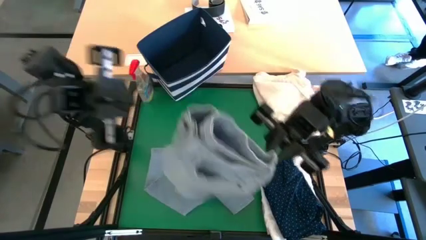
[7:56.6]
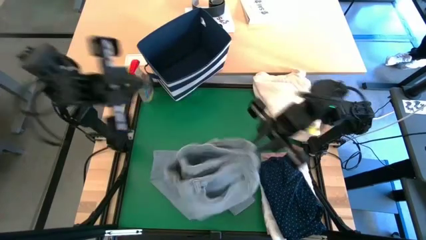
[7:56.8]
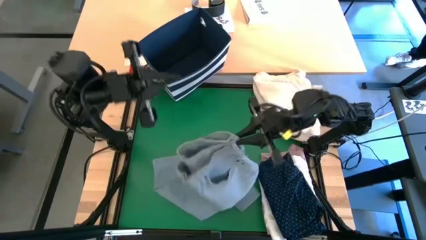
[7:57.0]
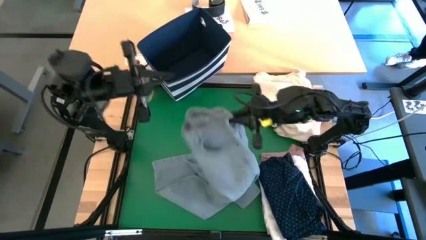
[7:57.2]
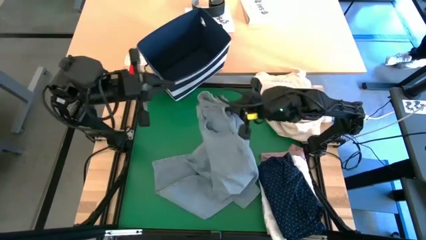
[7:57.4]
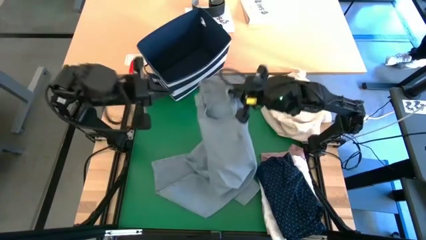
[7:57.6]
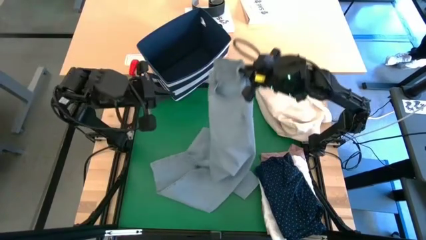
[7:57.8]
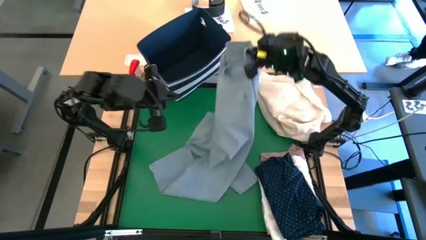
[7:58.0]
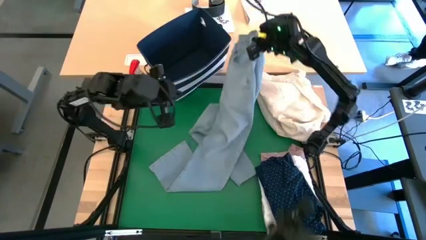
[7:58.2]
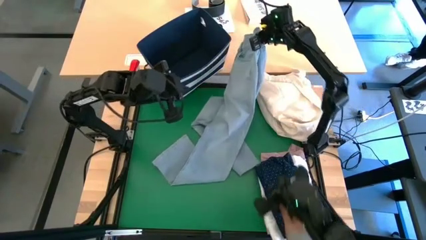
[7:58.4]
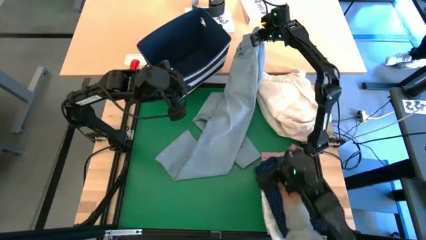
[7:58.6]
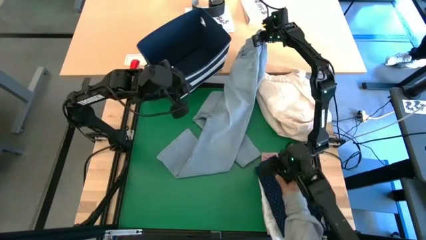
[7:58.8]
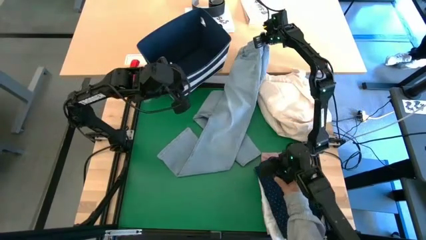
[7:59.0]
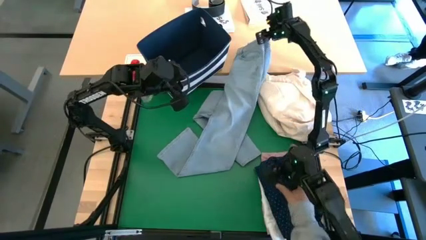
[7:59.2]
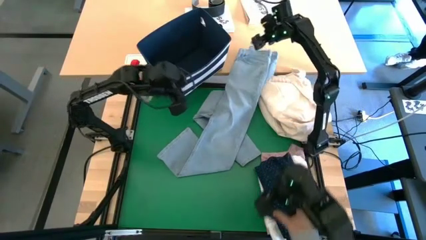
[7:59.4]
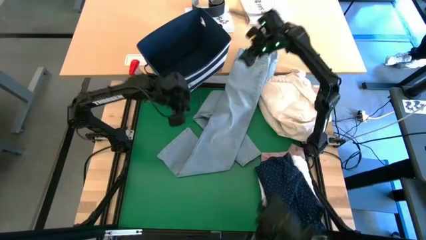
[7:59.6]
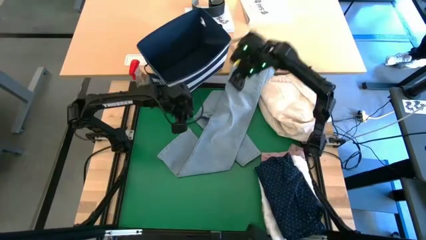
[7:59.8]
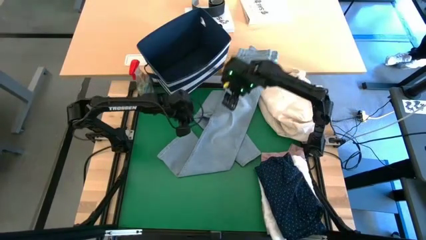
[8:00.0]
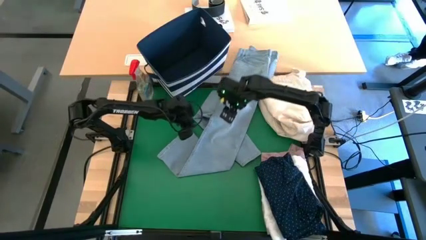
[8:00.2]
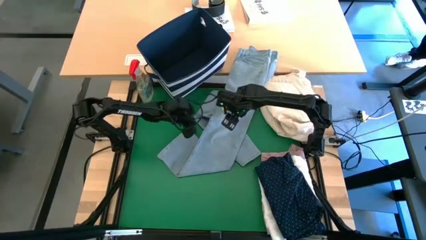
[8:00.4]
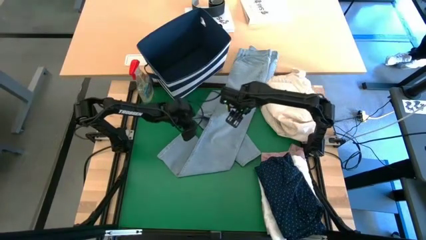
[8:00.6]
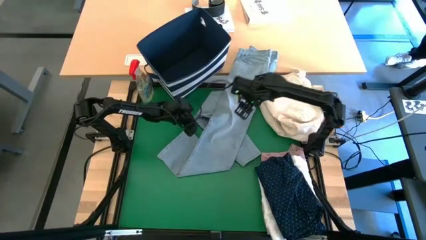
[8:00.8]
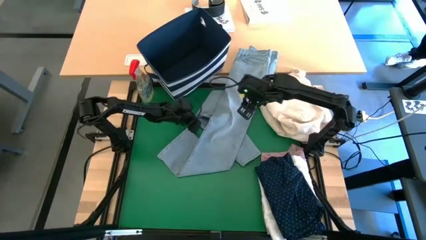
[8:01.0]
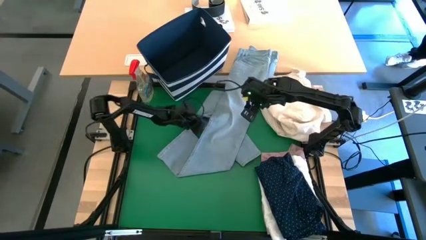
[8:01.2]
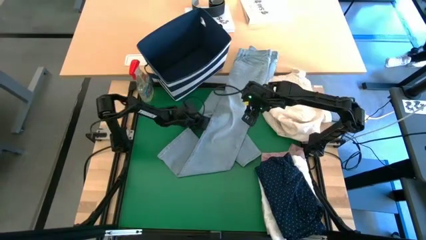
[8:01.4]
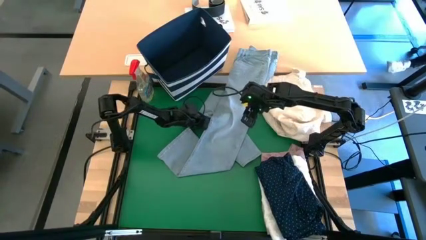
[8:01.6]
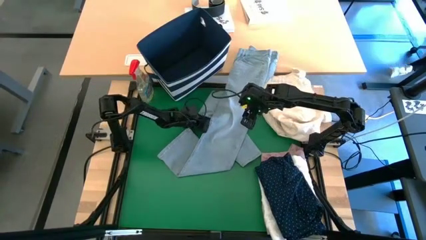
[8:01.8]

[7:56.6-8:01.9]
Task: Fold laundry
Fold the blue jeans

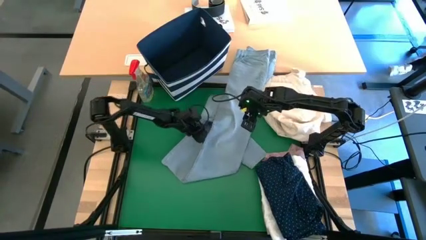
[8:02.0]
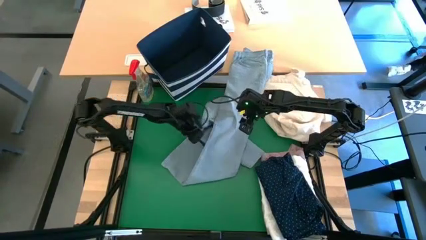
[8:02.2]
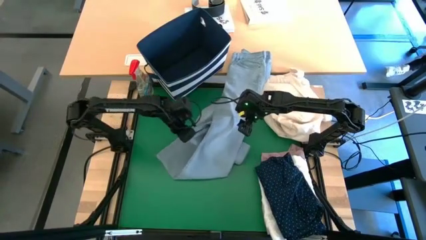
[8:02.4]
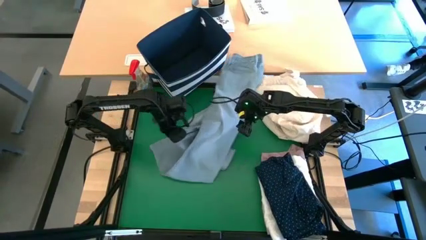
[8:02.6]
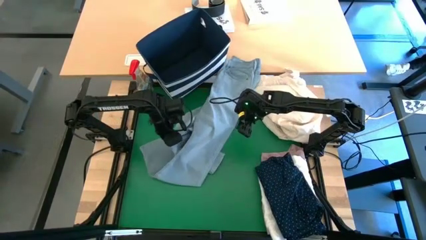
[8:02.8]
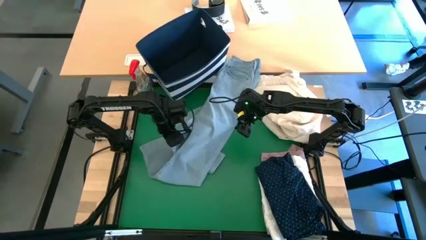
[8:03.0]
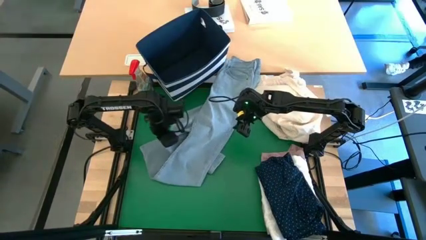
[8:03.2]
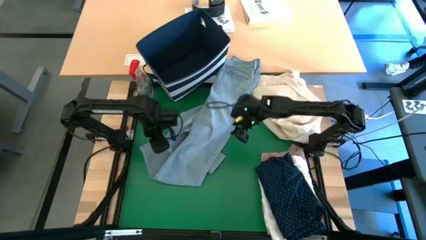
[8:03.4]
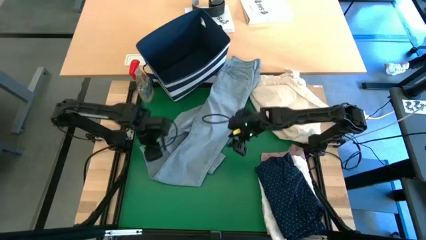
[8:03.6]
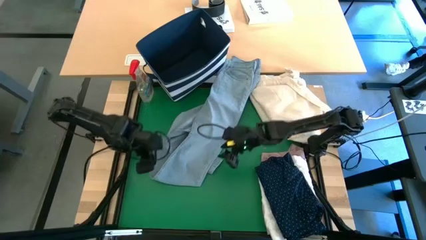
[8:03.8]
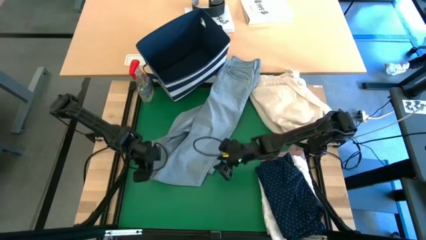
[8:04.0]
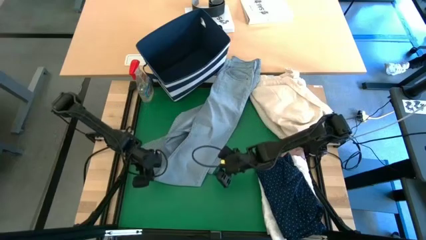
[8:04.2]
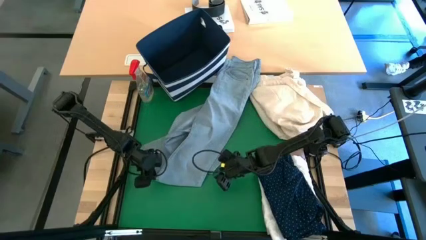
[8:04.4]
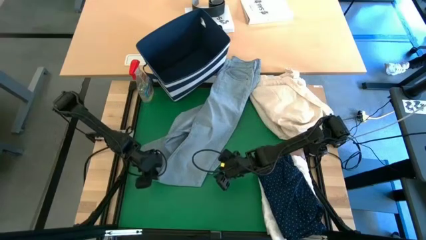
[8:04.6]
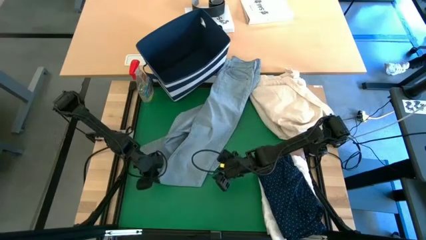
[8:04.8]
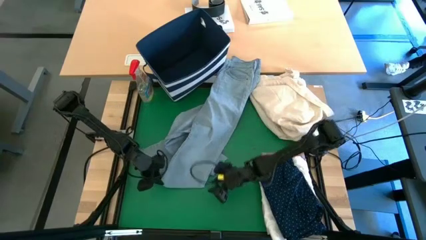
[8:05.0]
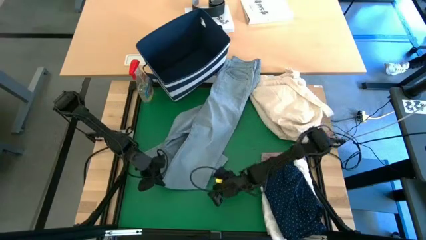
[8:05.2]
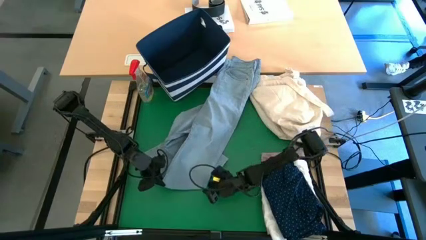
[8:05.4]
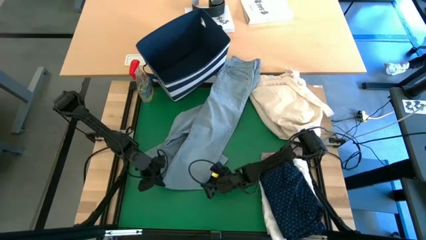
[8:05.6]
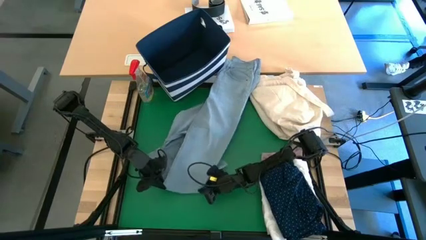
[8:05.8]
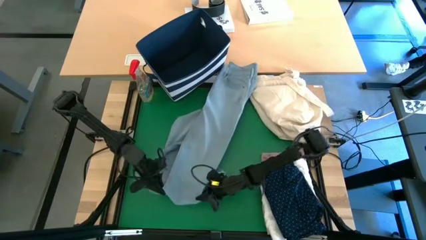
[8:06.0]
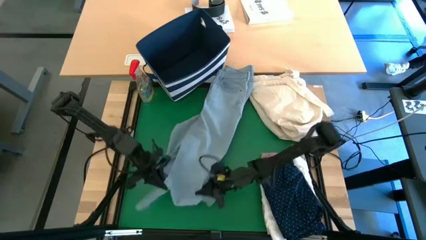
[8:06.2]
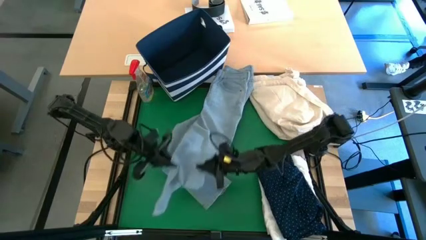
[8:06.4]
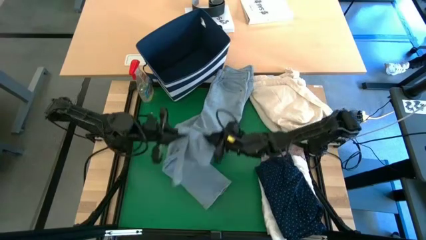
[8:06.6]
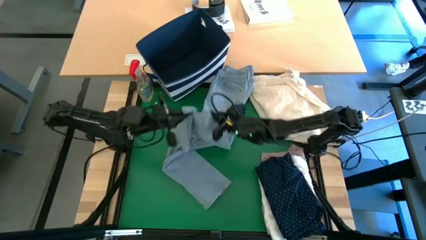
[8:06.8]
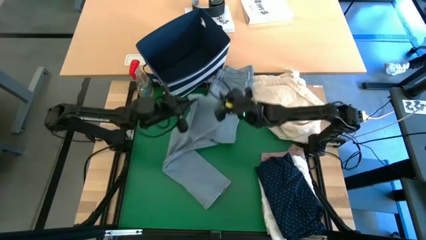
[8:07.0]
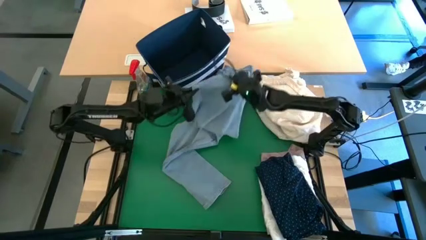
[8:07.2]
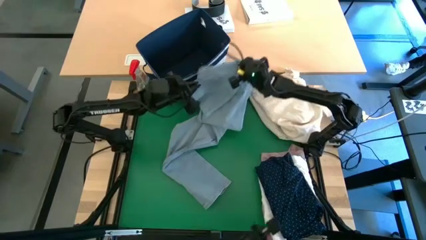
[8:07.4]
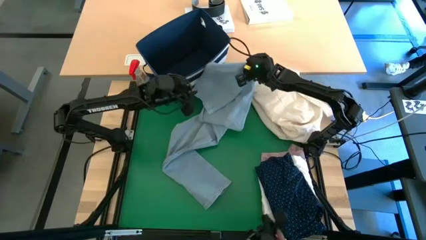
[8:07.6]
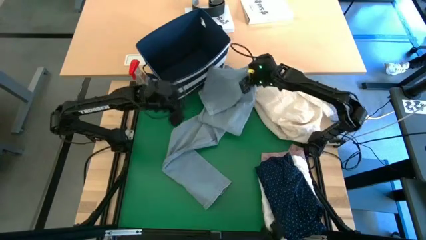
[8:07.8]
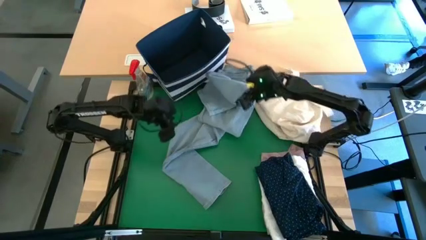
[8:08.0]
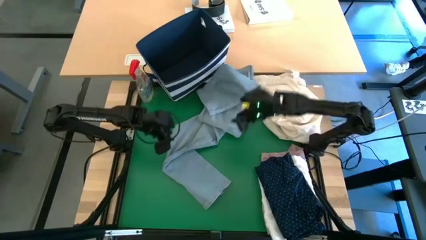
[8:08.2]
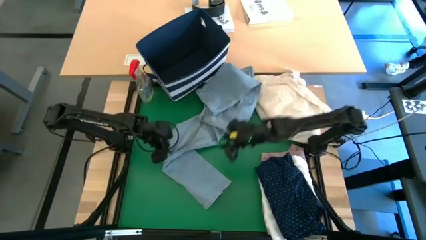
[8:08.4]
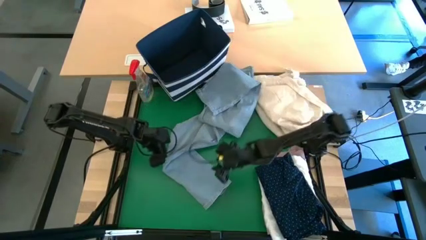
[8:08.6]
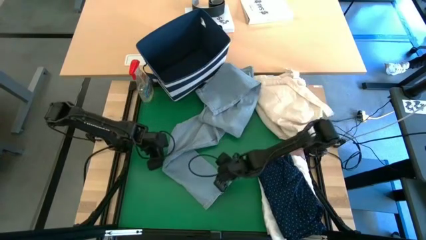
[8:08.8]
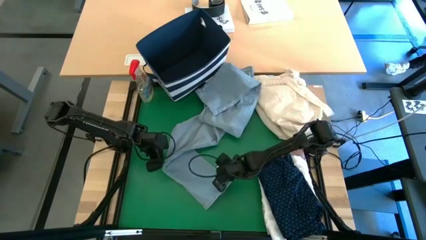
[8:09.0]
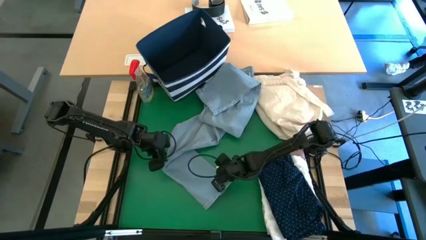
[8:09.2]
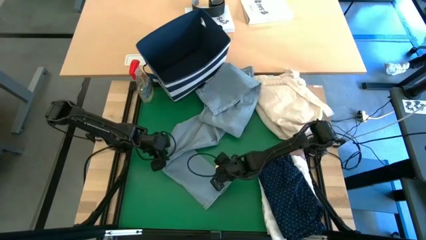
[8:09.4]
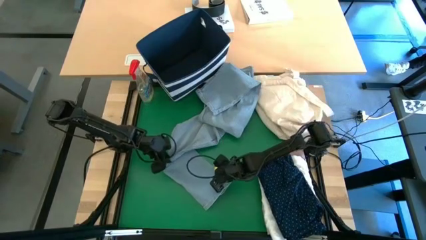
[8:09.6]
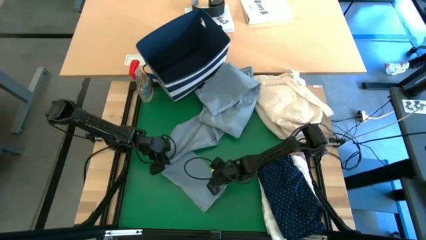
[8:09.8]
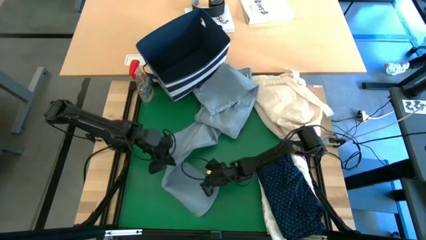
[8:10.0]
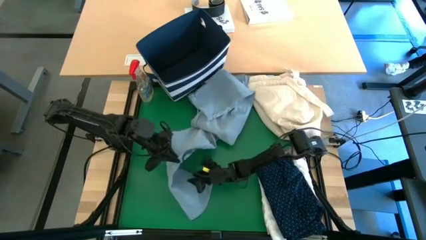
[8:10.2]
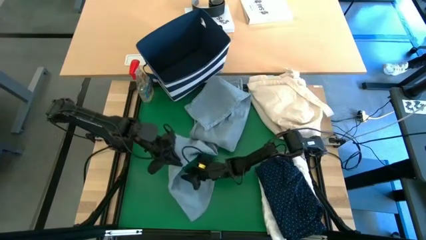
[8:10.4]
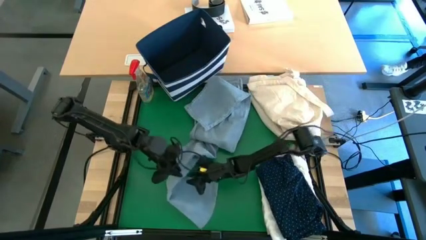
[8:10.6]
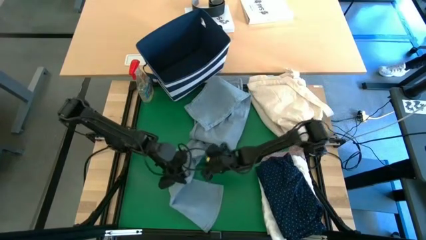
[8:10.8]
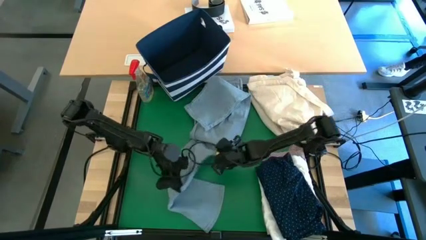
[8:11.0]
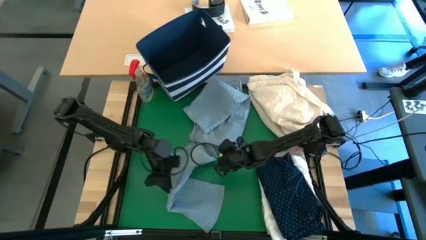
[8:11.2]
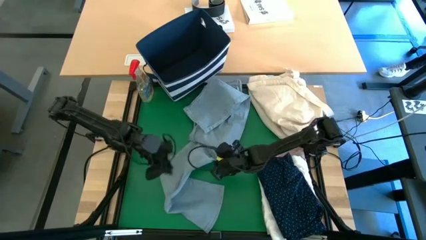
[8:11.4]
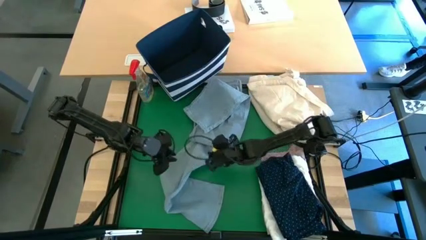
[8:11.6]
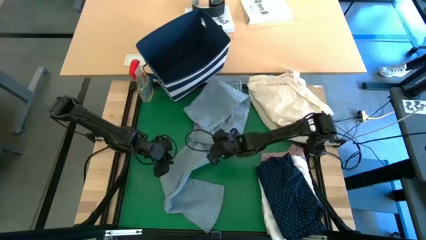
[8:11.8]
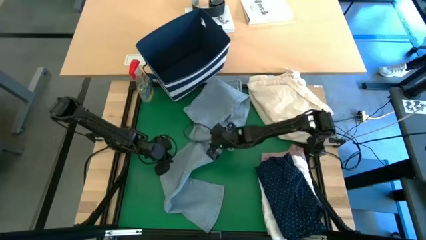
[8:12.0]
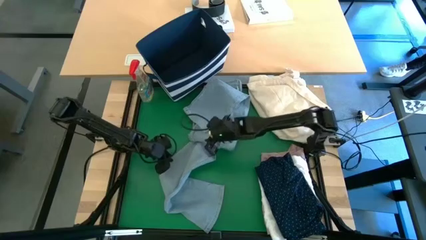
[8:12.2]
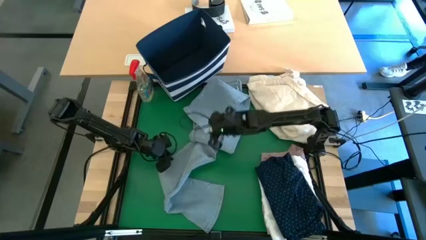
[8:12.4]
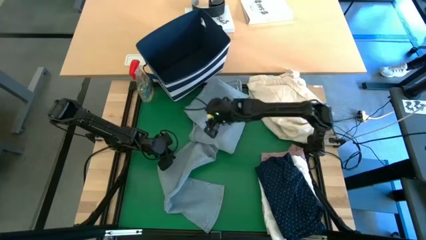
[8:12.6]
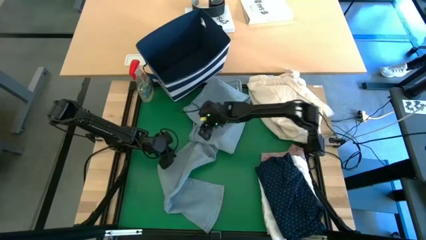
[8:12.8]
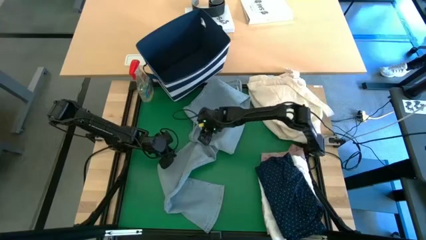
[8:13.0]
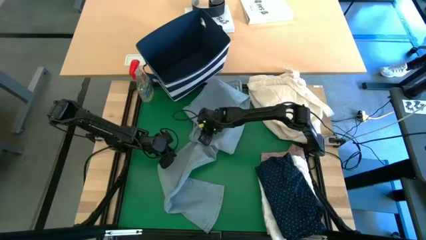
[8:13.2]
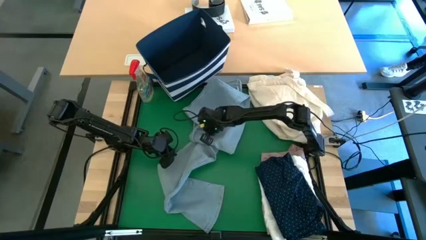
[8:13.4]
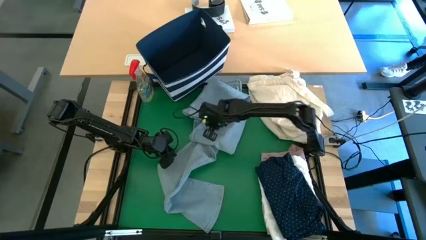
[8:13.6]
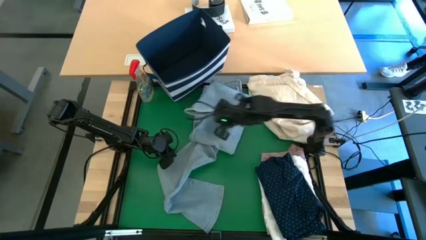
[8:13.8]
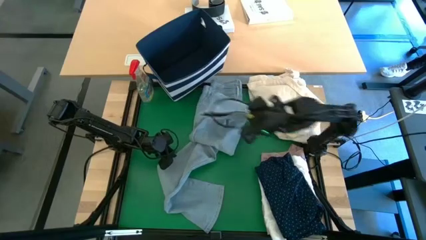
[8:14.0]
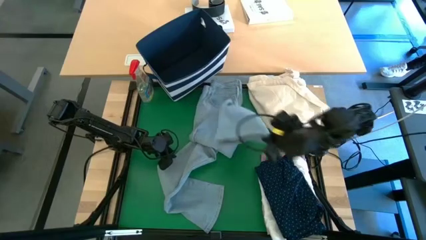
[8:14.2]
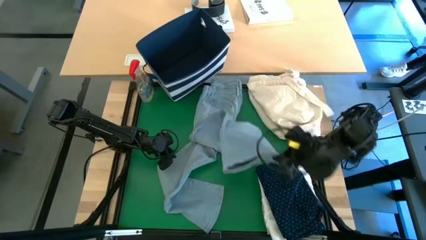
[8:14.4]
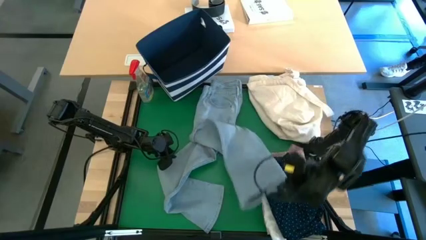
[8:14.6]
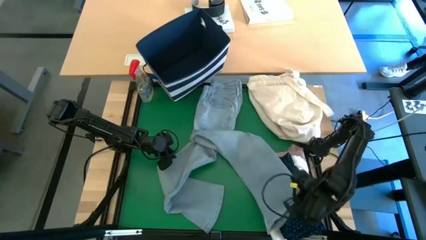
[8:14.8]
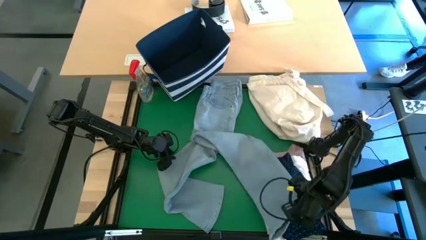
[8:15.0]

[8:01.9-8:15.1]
Fold the blue jeans
